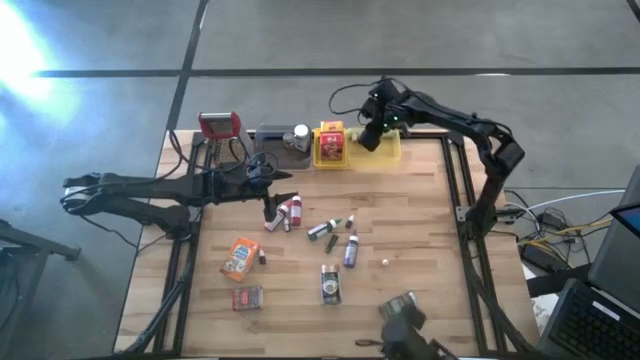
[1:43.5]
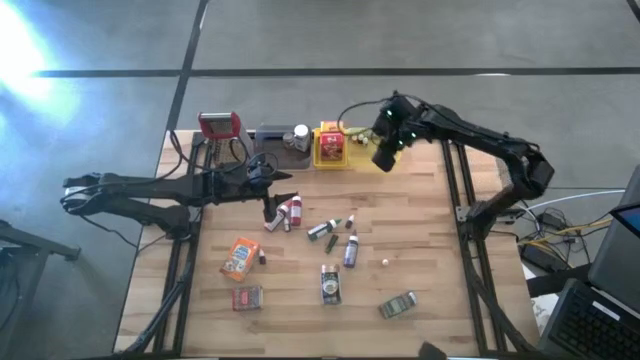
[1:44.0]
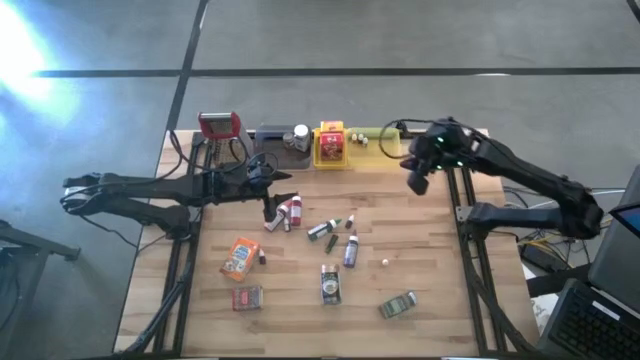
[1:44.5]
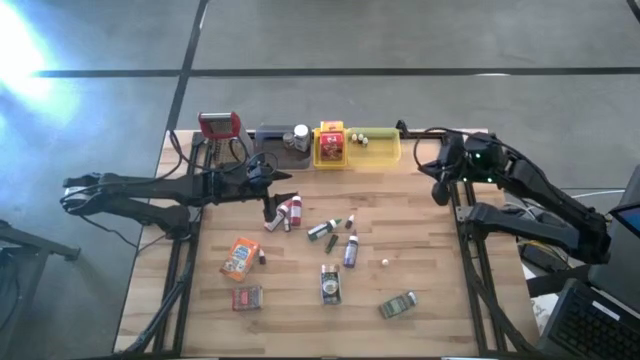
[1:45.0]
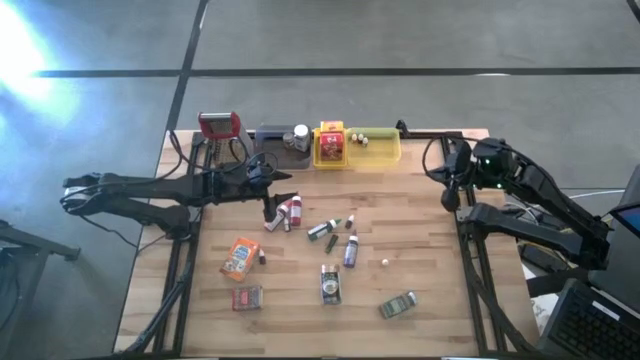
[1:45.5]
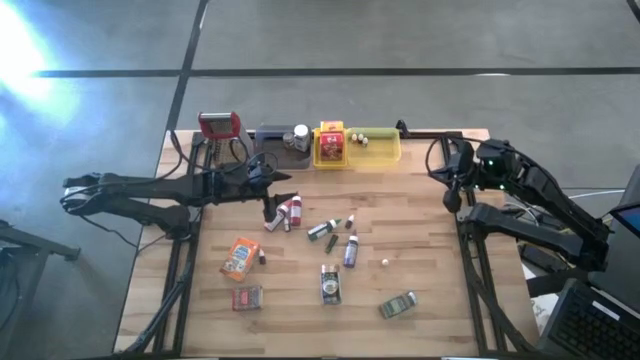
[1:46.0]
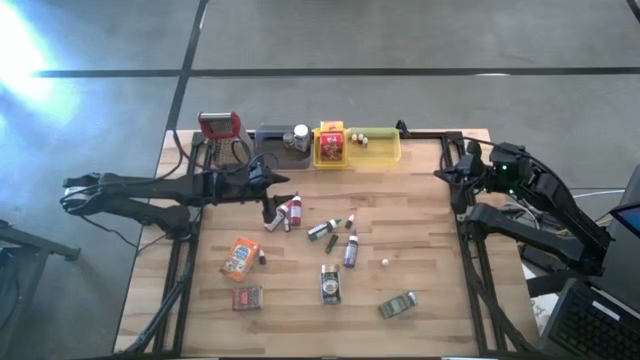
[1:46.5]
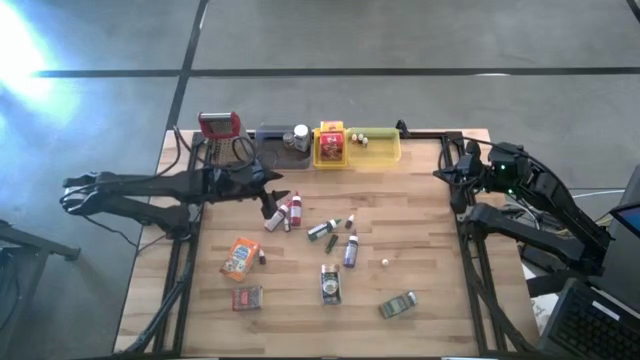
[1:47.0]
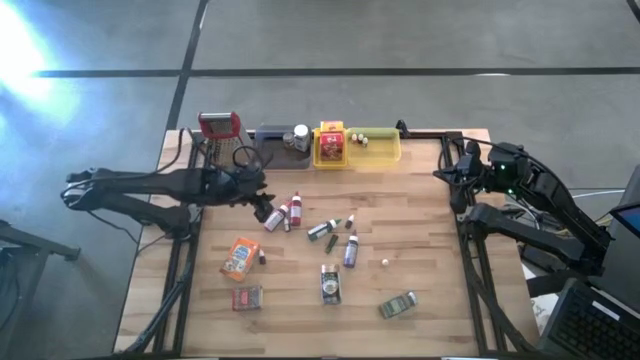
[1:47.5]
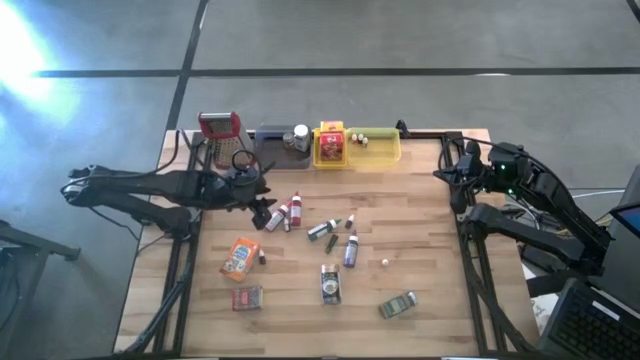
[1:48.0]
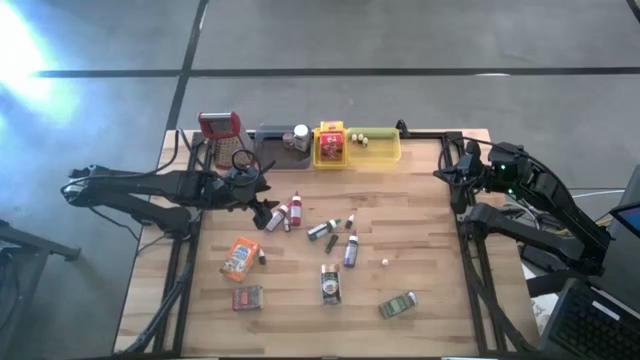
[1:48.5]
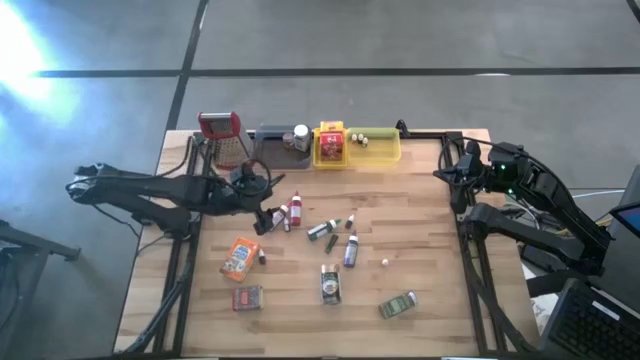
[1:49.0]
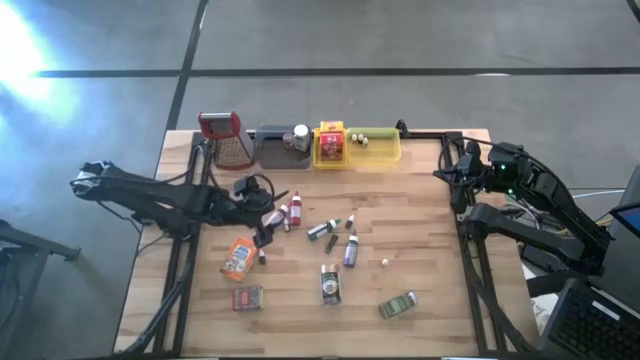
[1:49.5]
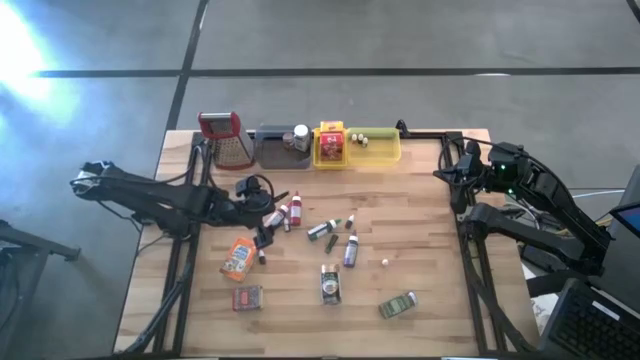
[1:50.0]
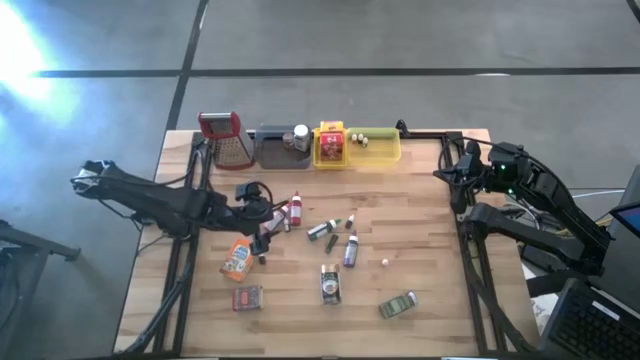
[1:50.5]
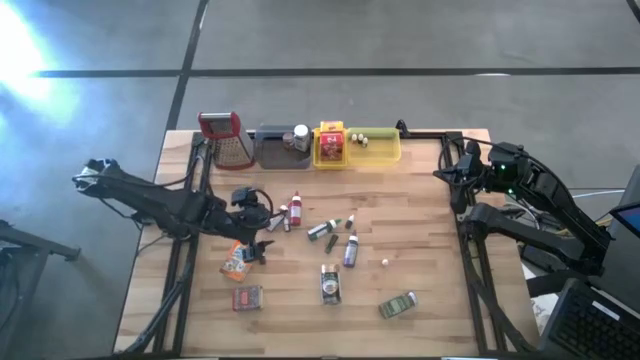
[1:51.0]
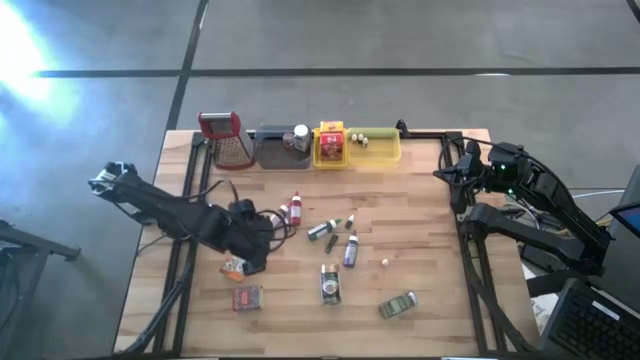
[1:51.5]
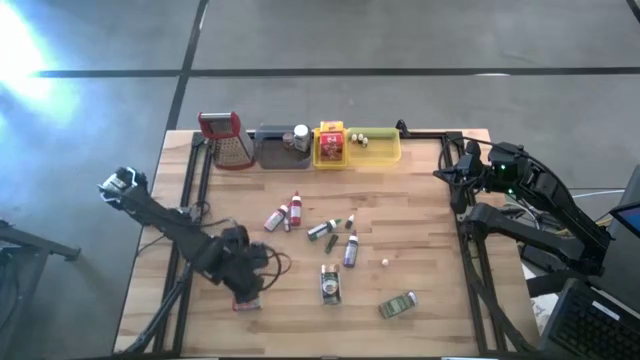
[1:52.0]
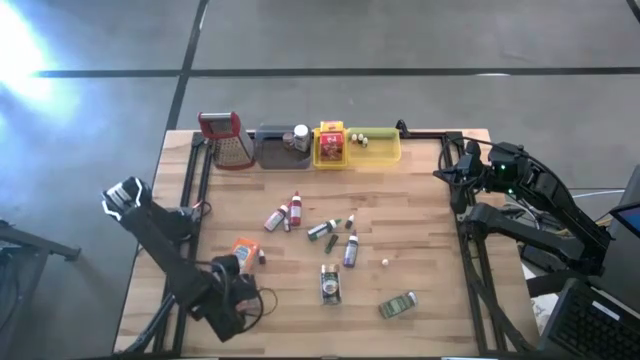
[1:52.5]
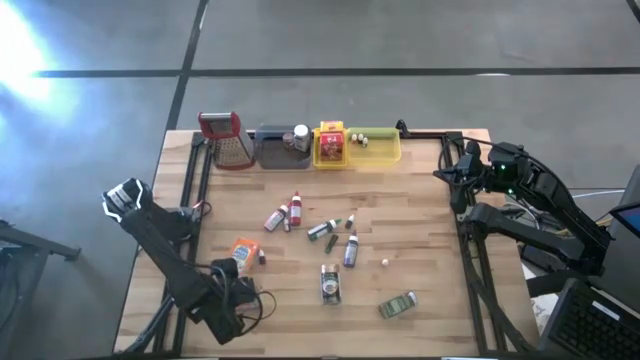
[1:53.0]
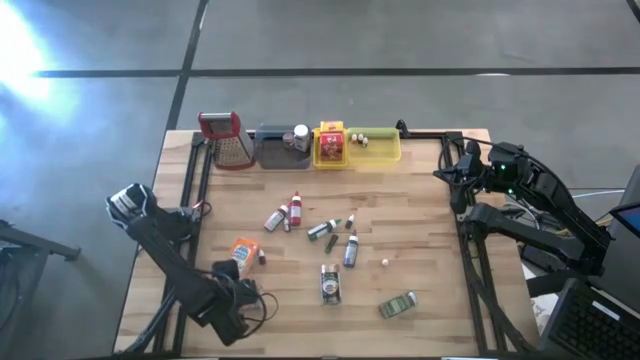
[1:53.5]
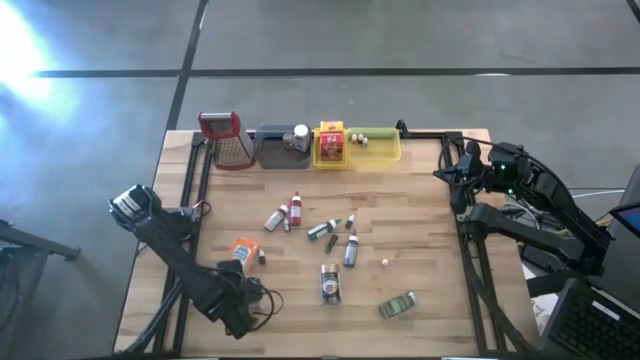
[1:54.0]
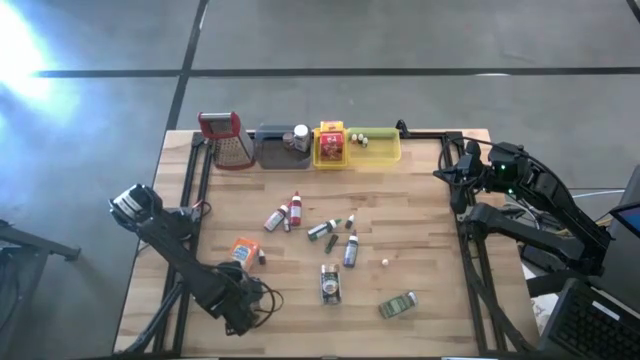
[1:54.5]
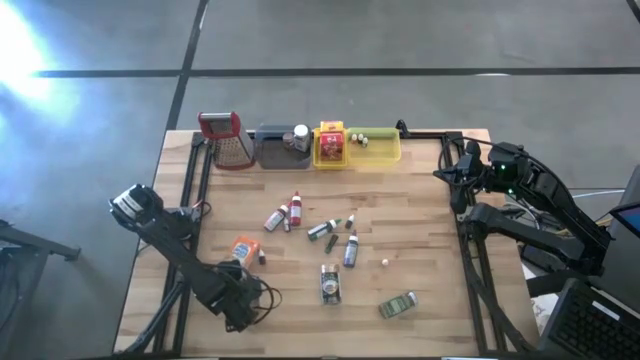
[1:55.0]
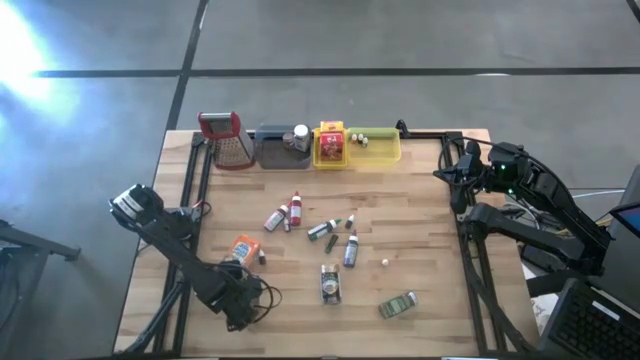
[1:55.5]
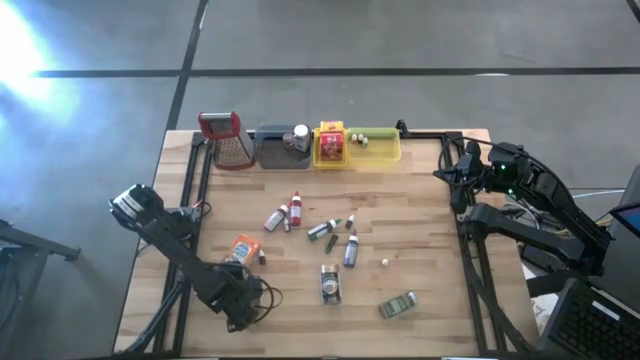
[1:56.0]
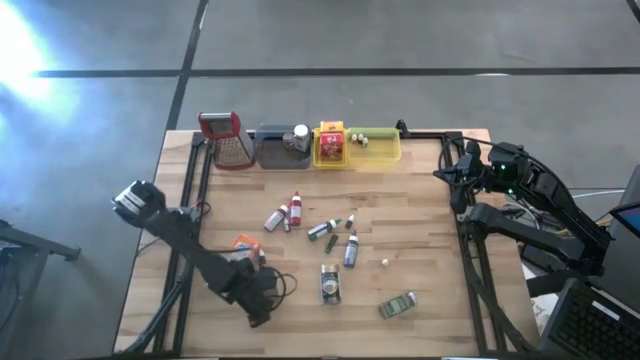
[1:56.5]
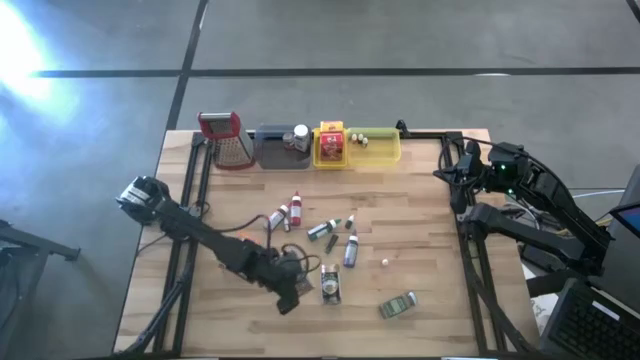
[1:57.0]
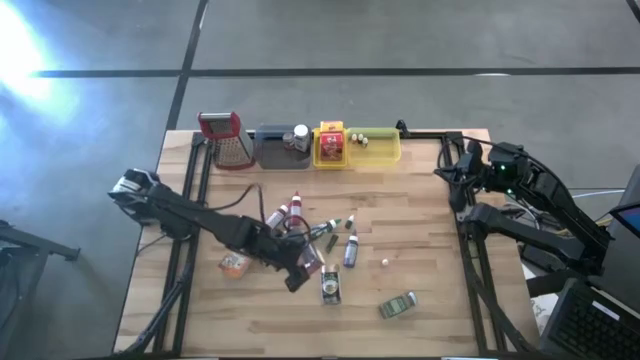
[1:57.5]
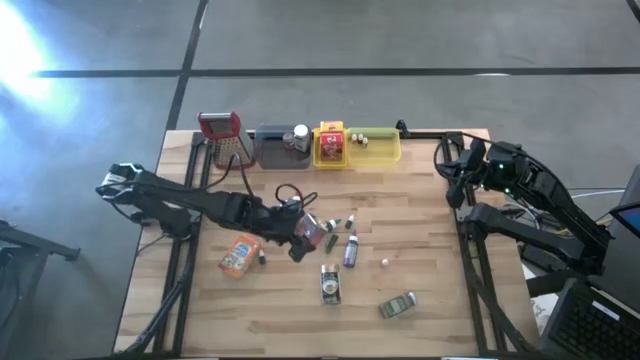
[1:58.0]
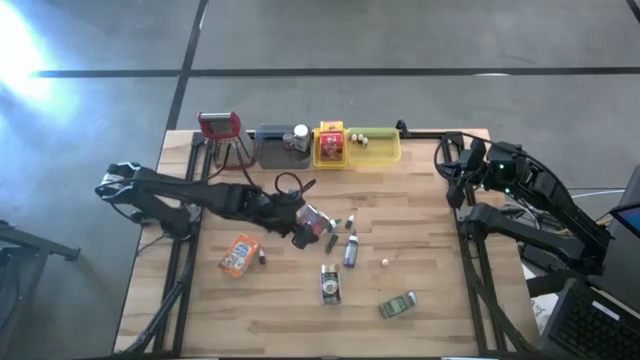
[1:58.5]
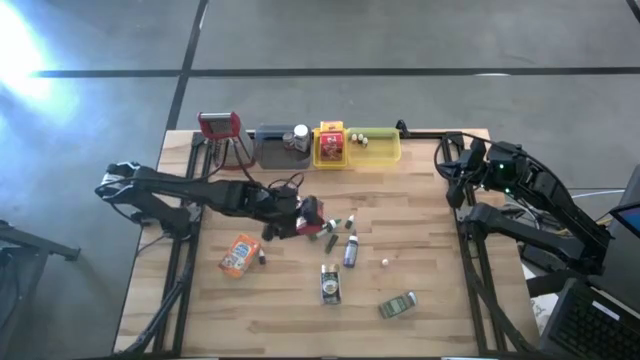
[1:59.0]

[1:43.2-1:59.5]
Task: Pick & Place Kitchen Items
Put the red seasoning can into the black bin
